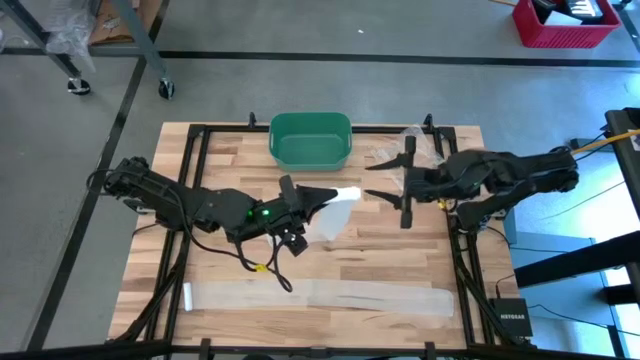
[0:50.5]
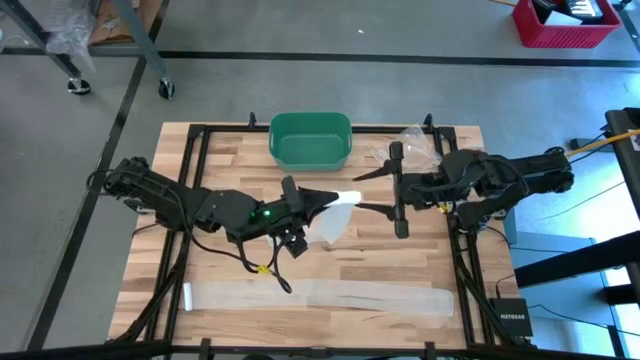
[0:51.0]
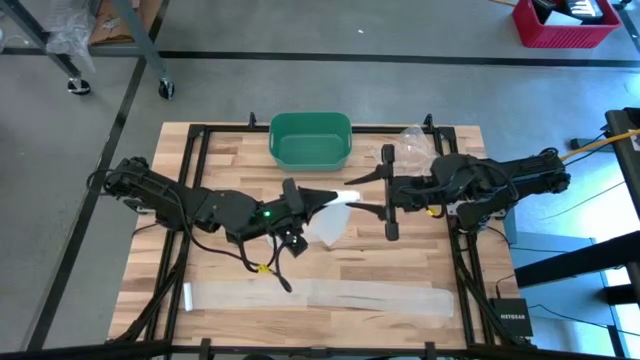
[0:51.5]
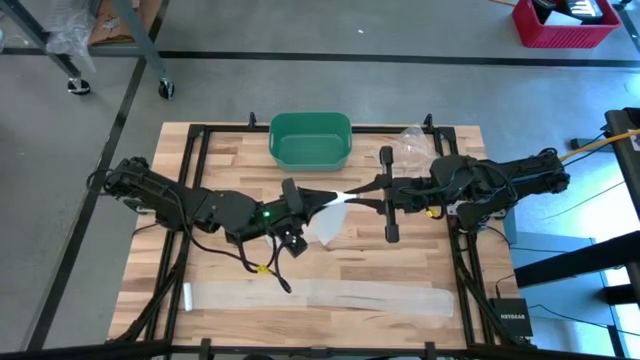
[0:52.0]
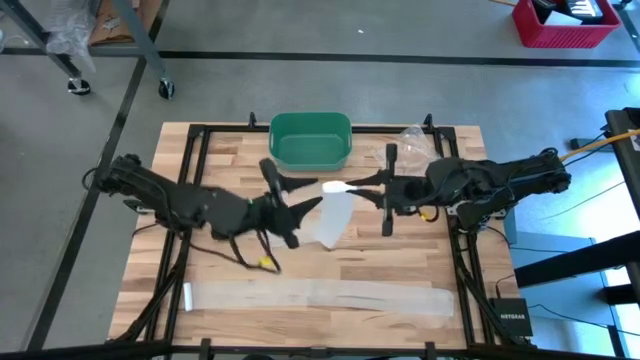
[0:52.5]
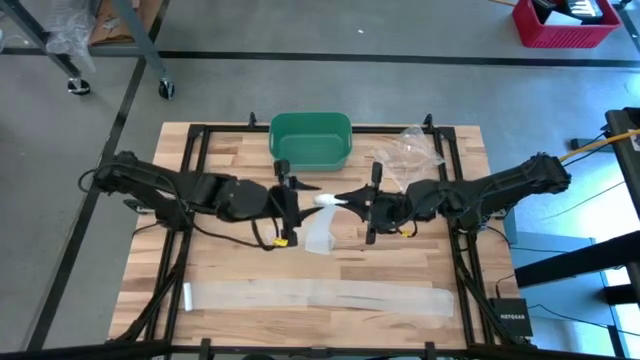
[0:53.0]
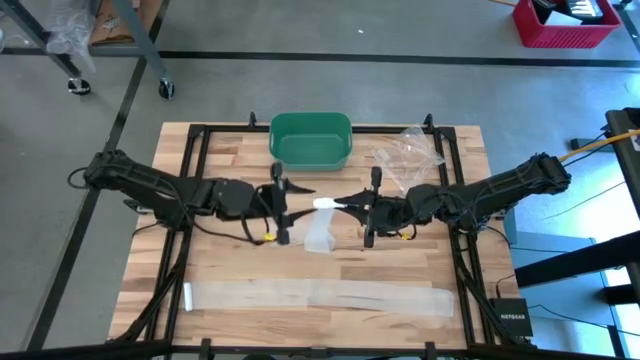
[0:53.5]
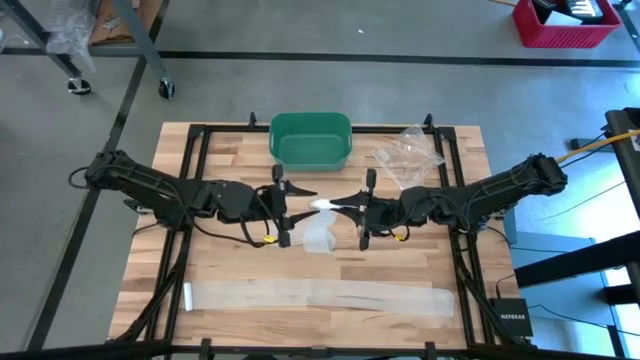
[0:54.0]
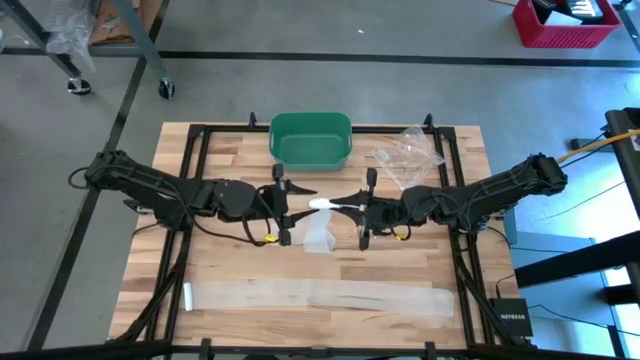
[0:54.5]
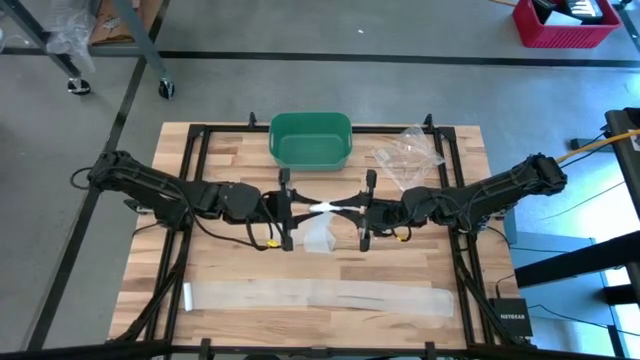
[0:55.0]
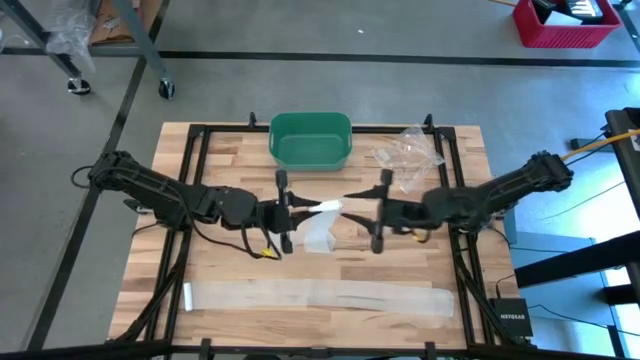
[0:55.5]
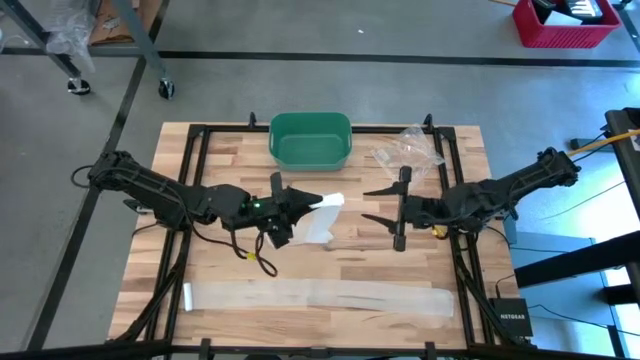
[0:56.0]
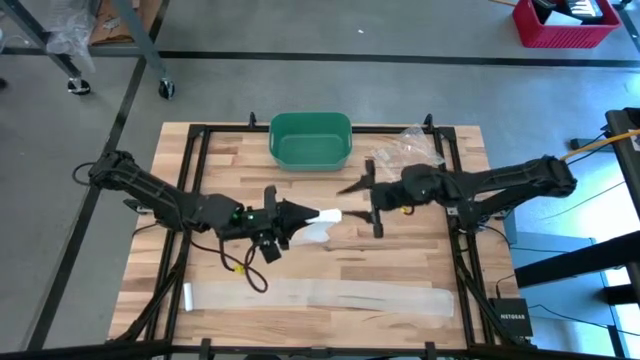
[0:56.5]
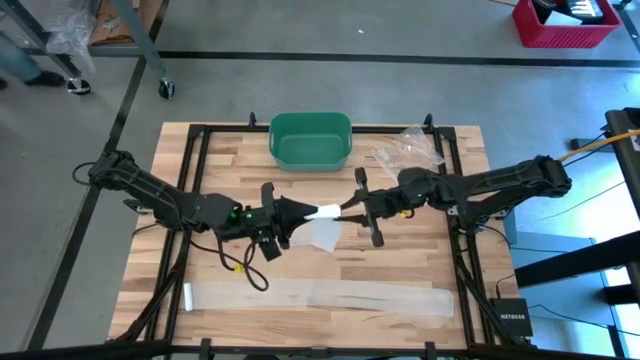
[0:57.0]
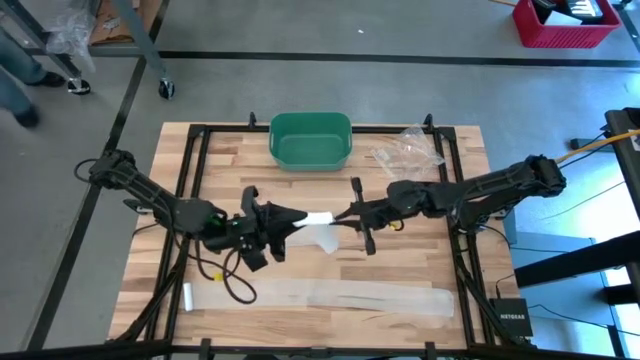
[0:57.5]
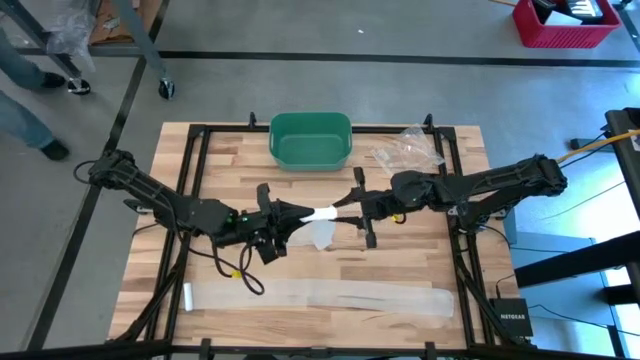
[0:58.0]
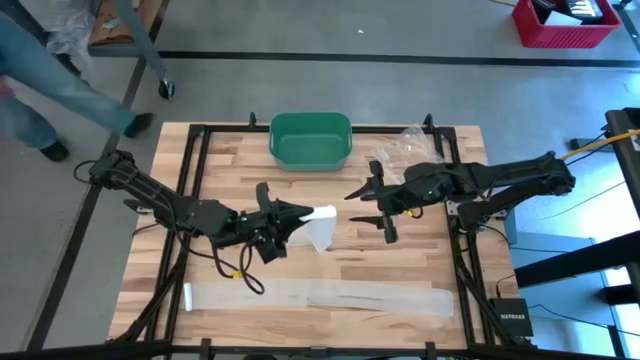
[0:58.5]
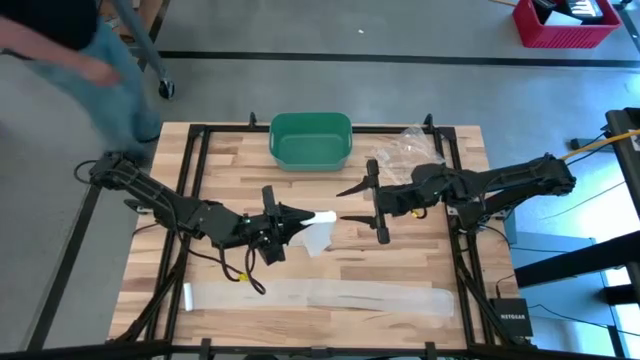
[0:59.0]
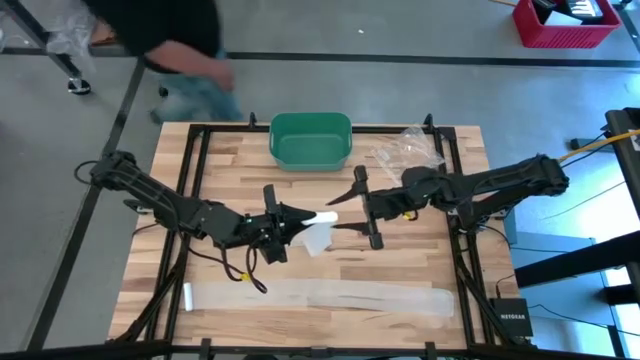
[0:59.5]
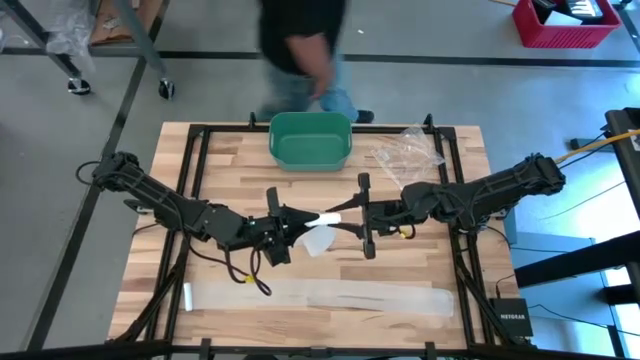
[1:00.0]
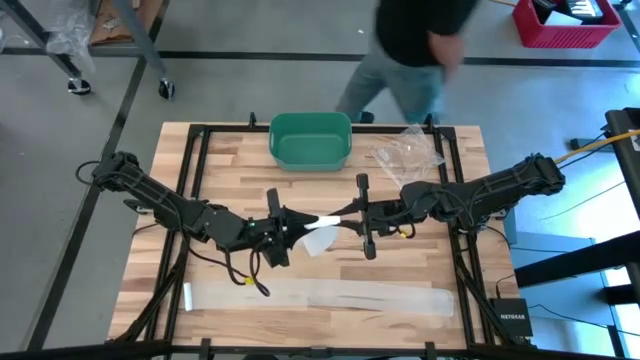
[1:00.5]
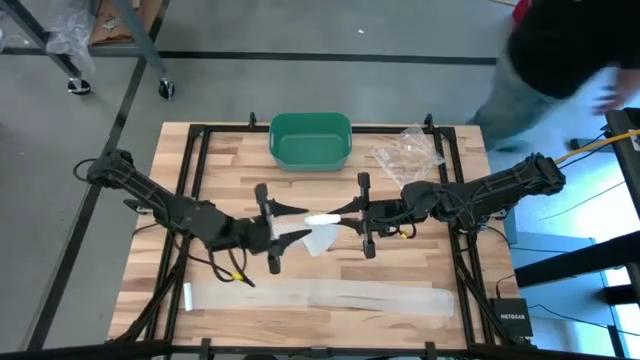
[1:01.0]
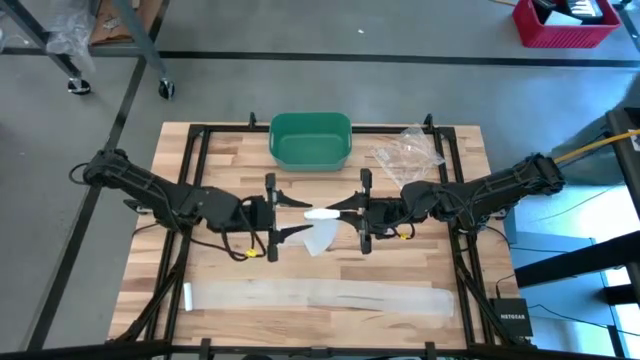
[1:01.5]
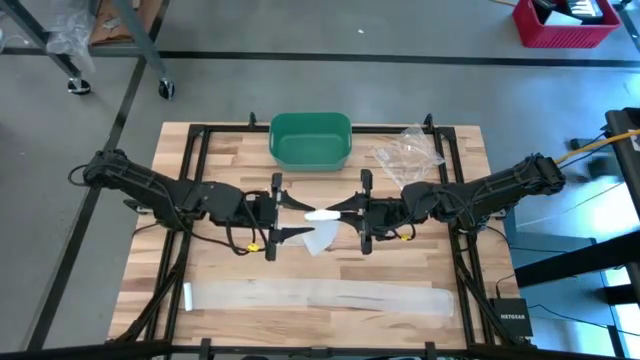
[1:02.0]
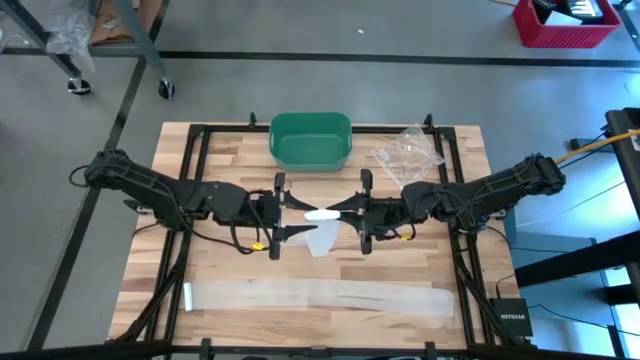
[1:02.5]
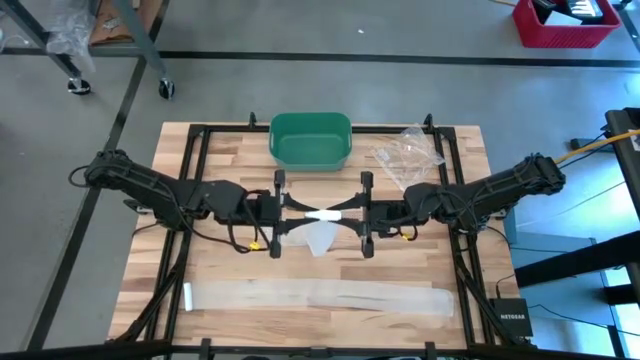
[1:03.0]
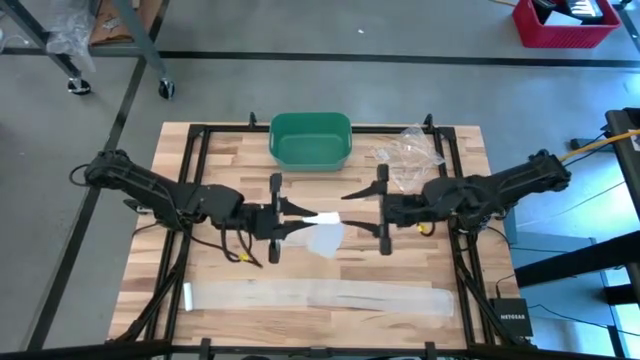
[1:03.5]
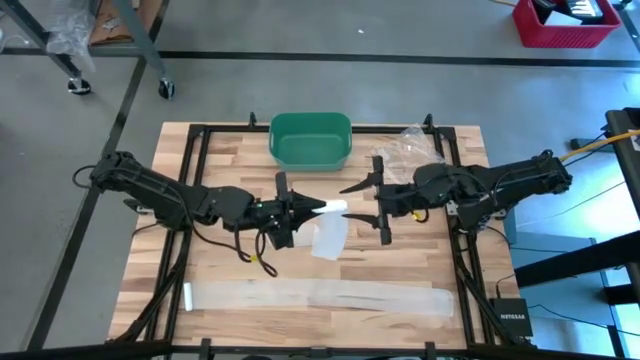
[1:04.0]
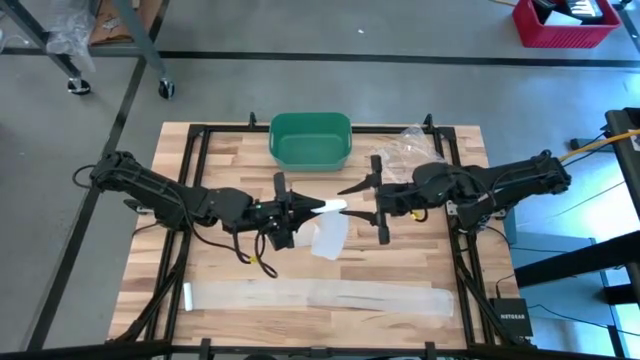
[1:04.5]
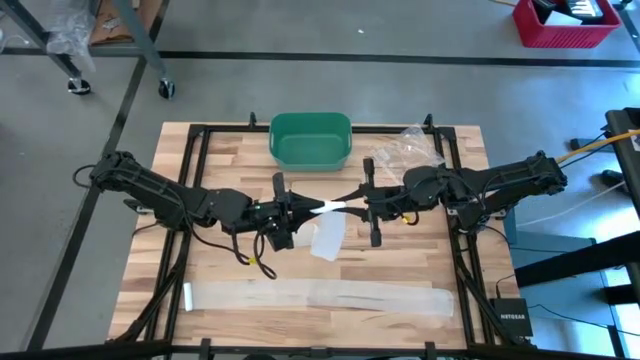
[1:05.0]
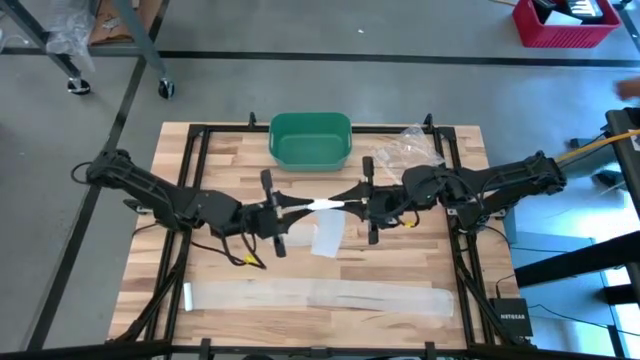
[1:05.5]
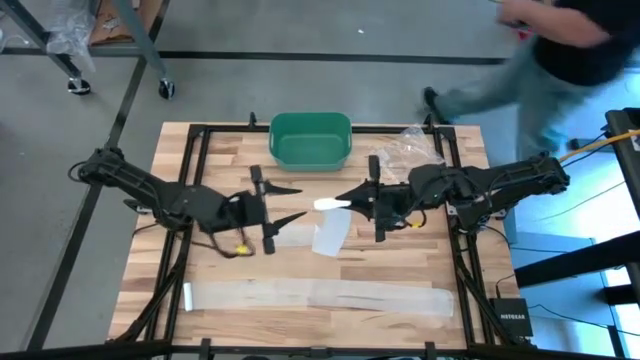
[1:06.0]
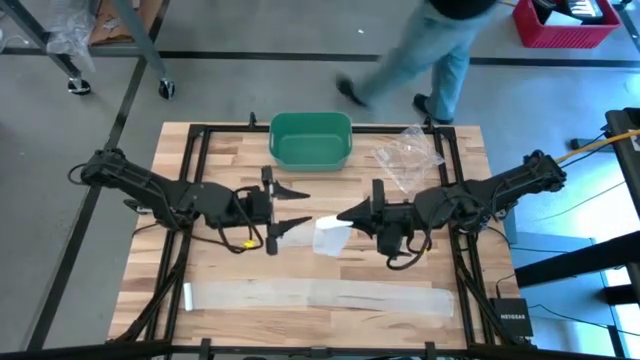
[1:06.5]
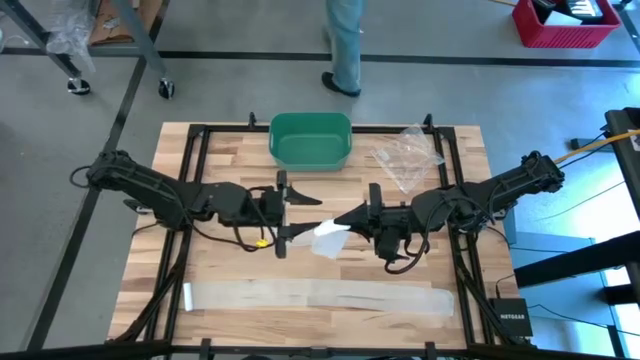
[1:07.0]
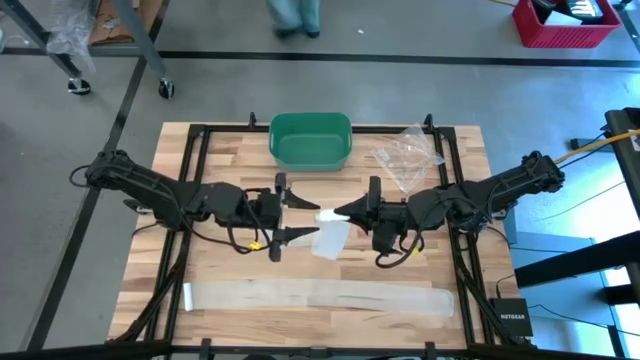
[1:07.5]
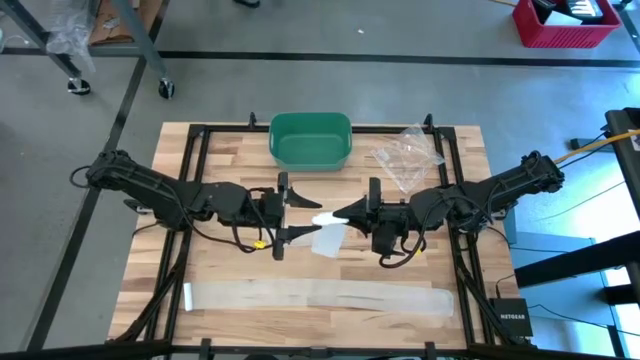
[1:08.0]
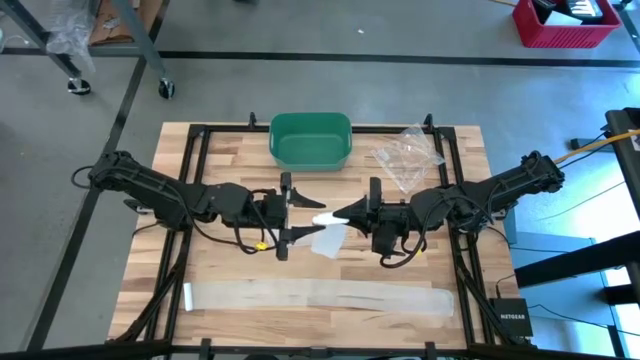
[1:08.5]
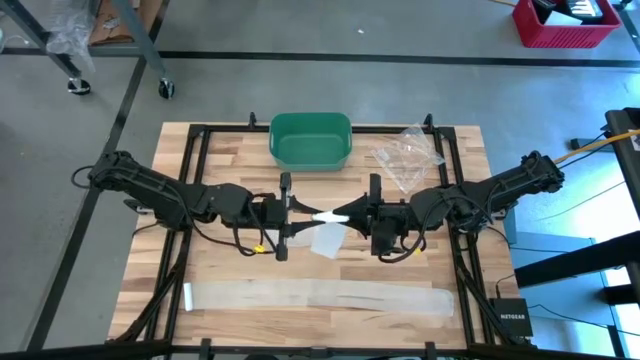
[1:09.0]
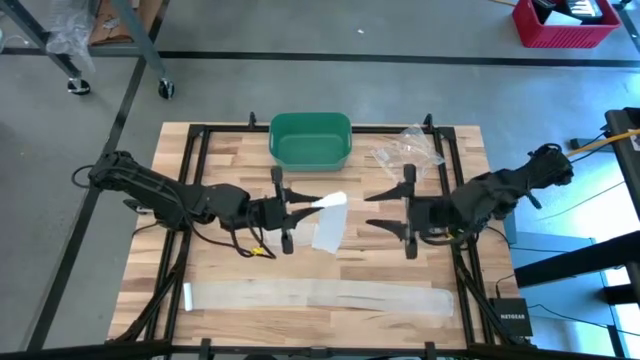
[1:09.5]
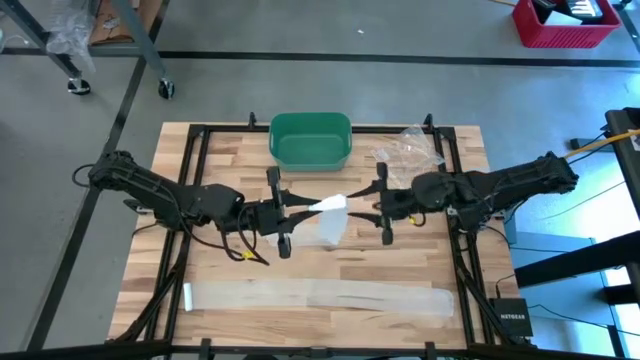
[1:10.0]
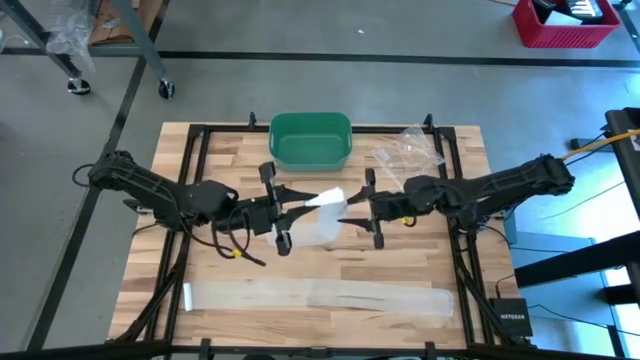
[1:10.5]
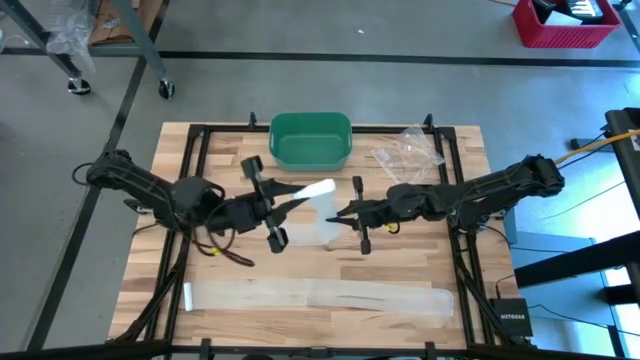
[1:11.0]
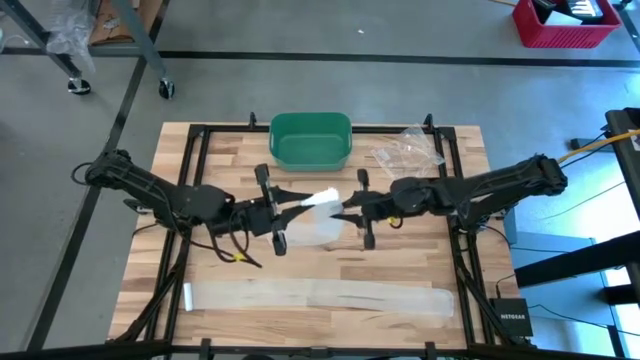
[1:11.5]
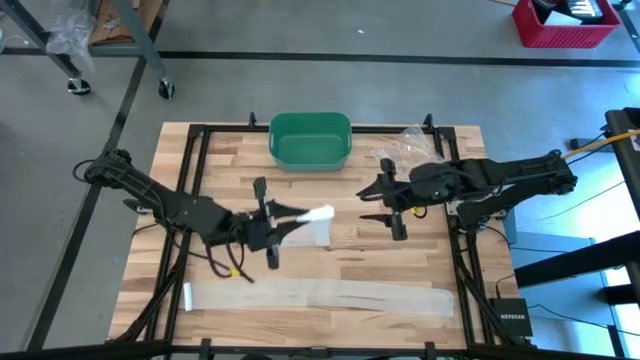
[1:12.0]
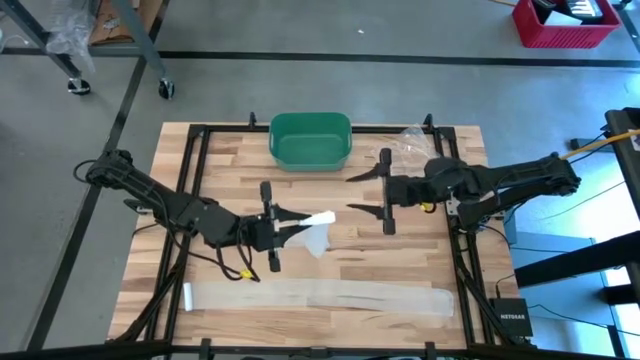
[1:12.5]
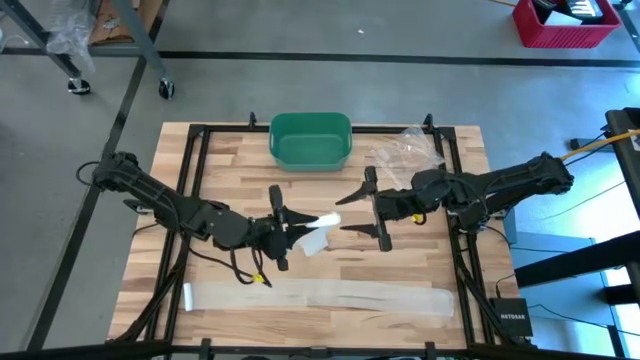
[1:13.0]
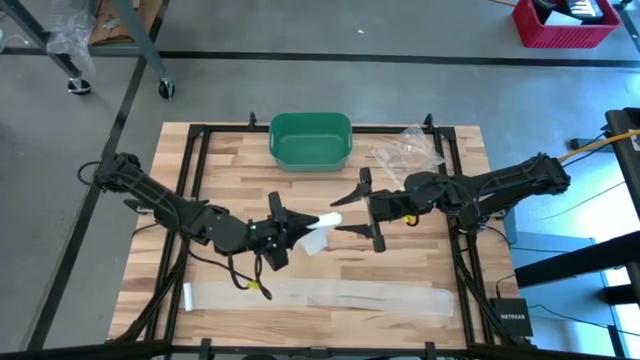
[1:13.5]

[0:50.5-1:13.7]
Task: Roll bandage
Roll the top white bandage
